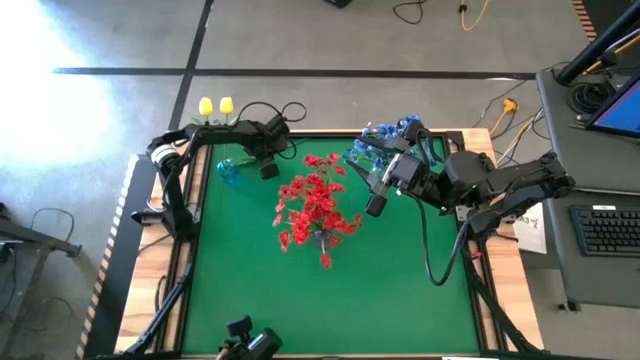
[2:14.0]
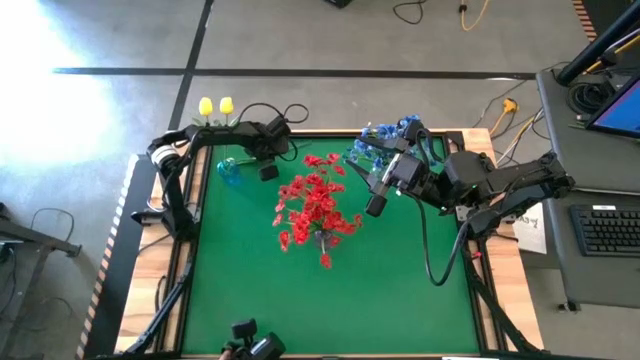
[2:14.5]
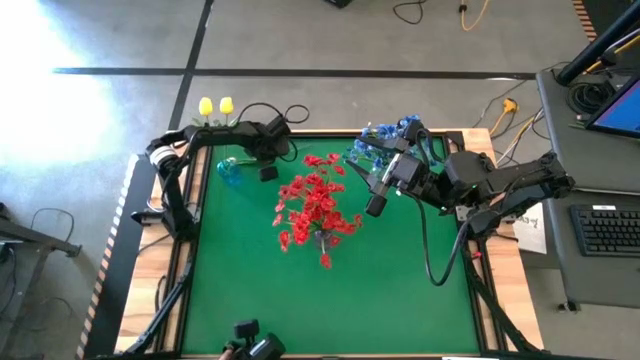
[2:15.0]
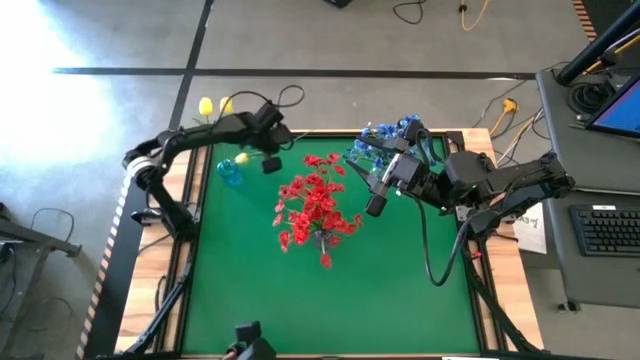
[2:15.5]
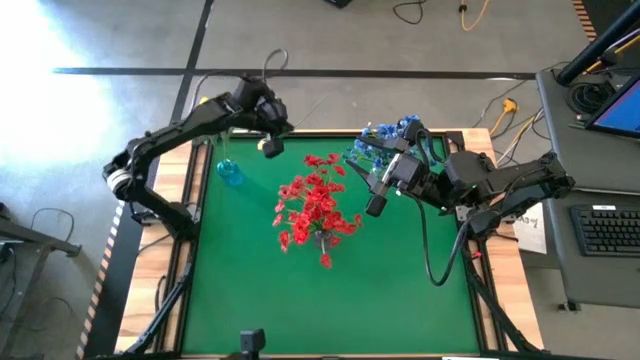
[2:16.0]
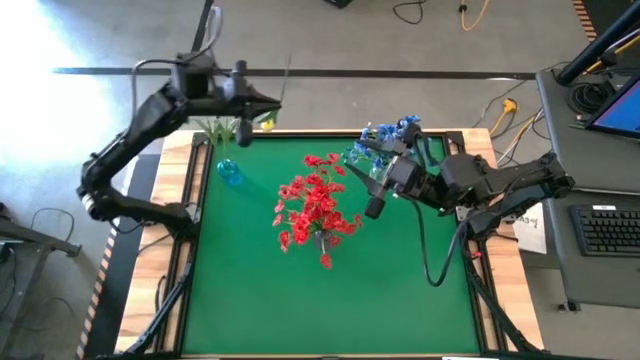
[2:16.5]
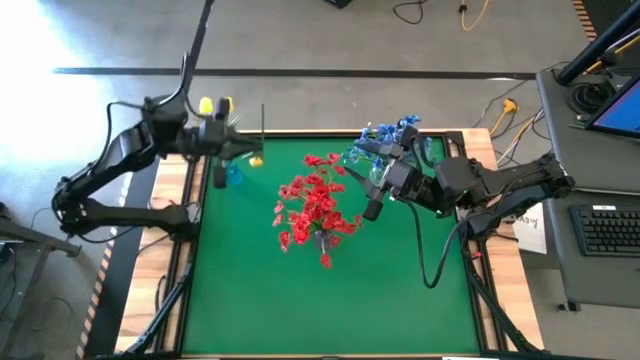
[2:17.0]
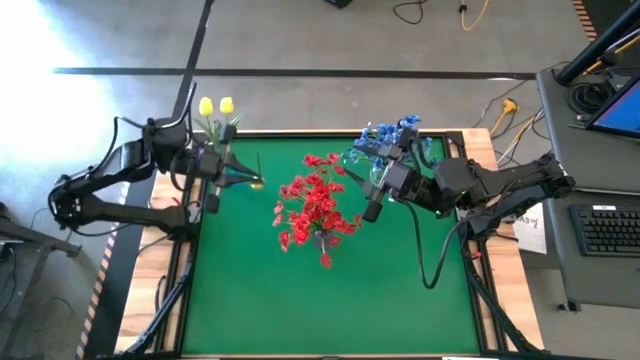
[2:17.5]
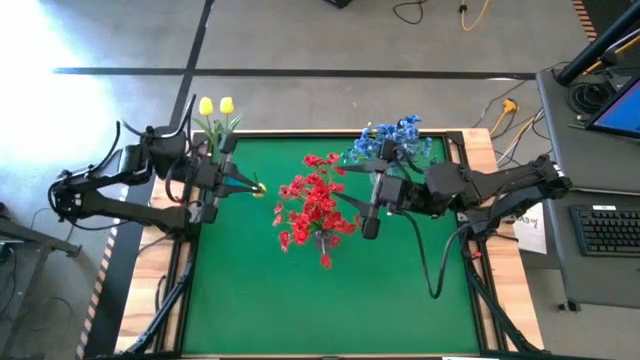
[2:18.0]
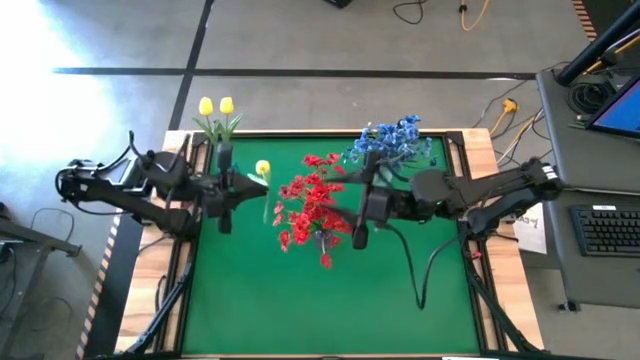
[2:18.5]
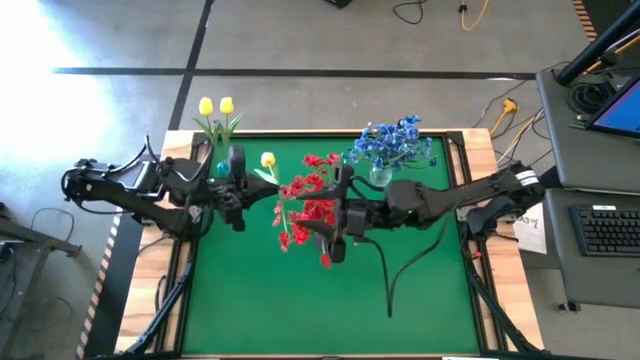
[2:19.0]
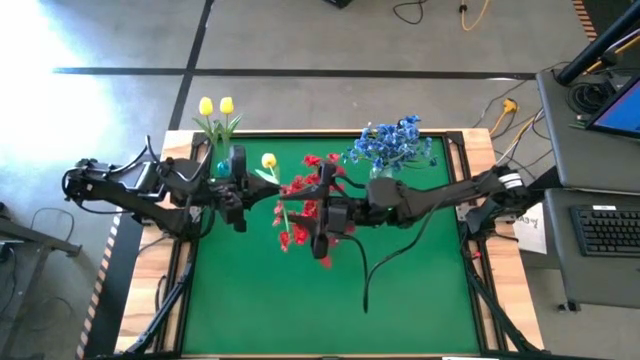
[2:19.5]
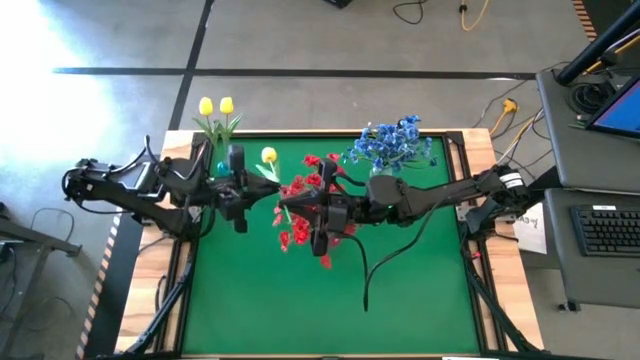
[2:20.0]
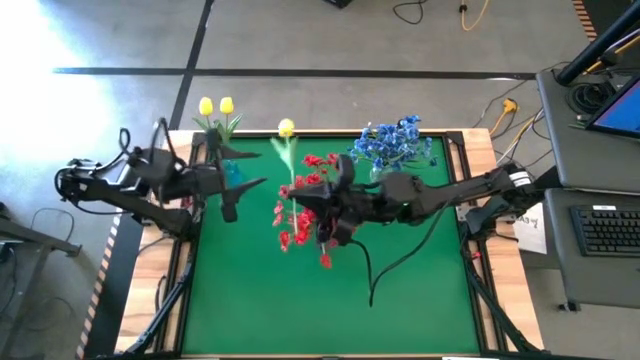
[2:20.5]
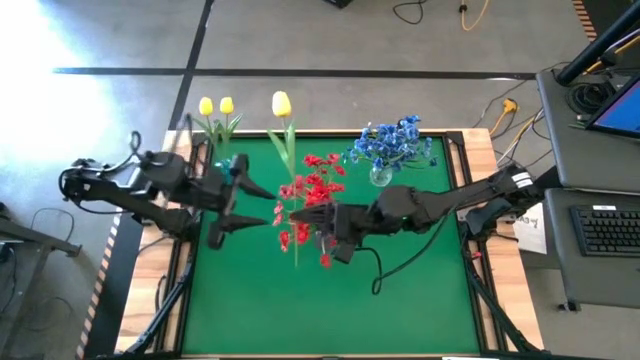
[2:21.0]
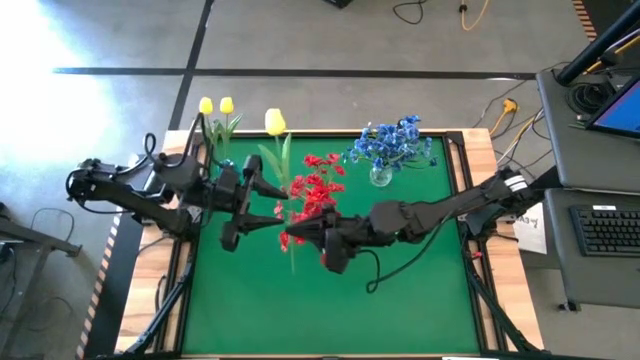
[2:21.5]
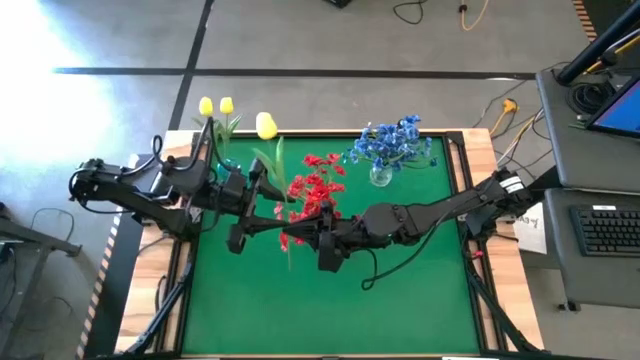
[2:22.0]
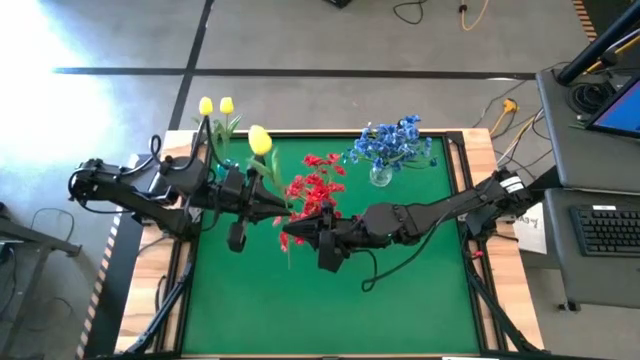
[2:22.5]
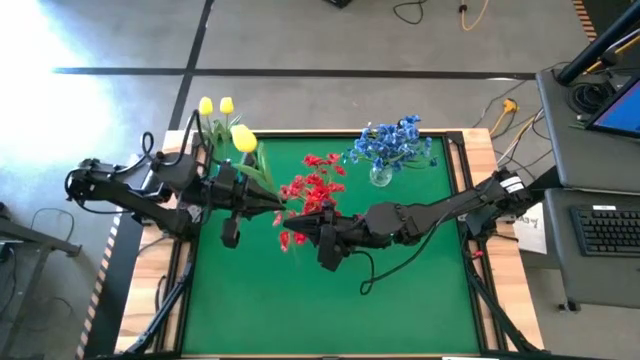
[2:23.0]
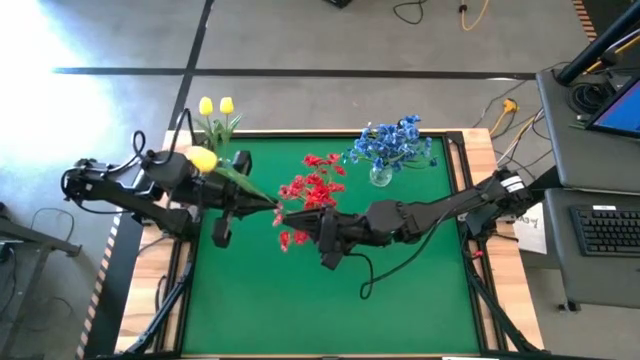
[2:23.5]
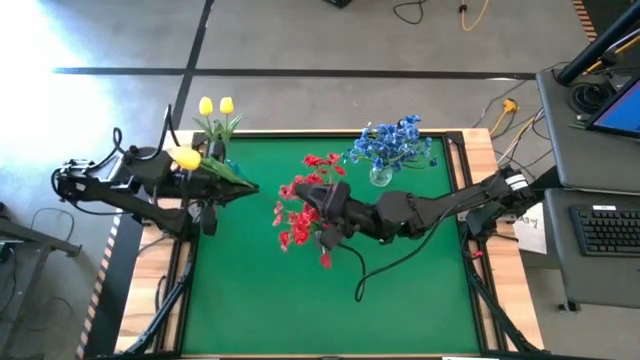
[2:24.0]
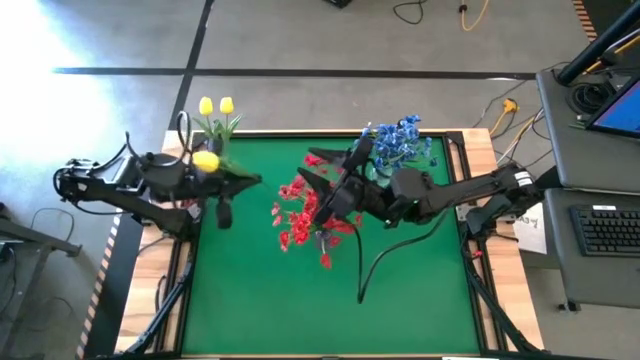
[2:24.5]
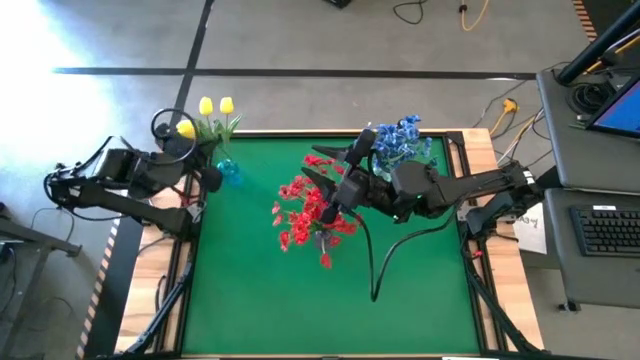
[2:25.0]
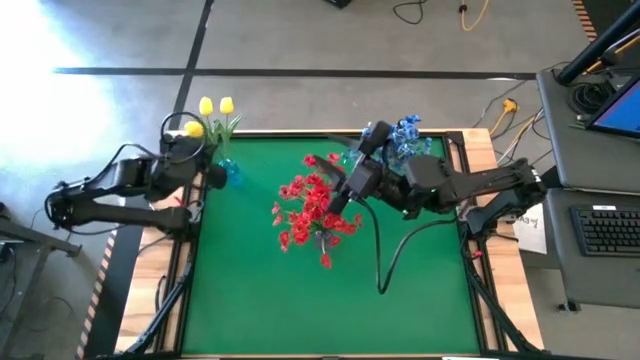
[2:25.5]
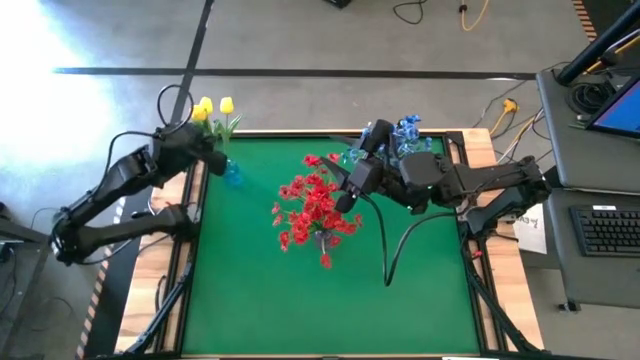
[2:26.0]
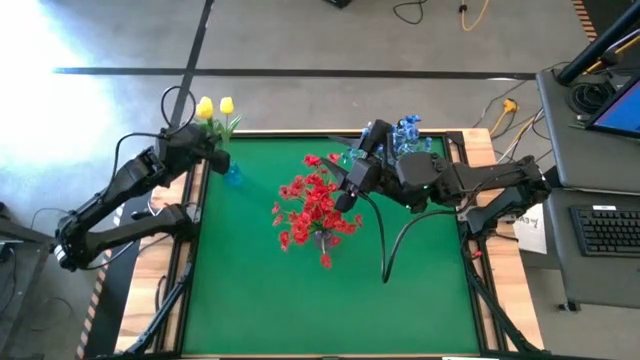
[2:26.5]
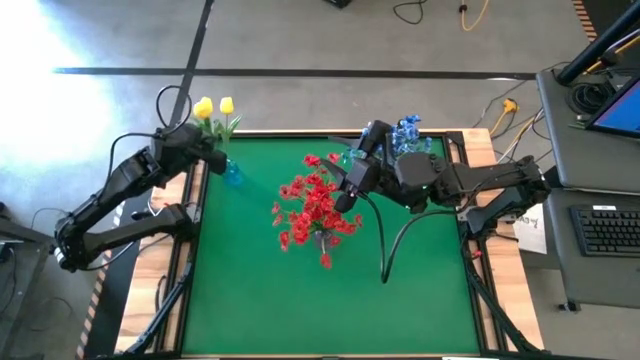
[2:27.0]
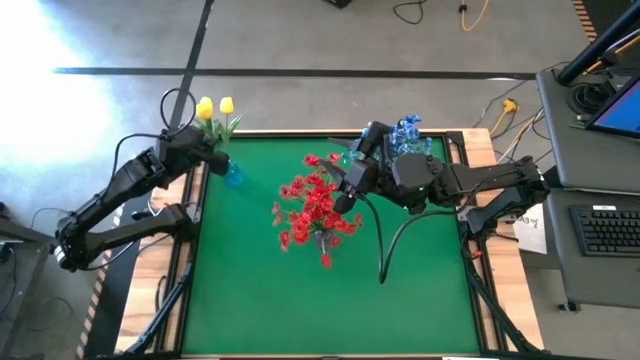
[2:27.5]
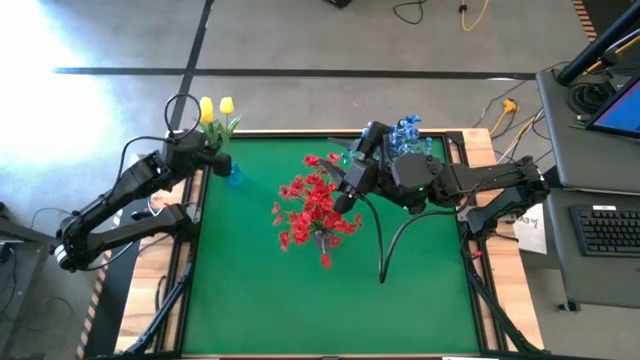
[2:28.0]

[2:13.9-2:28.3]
Task: Sort flowers into vase by color
Put the yellow flower into the blue vase

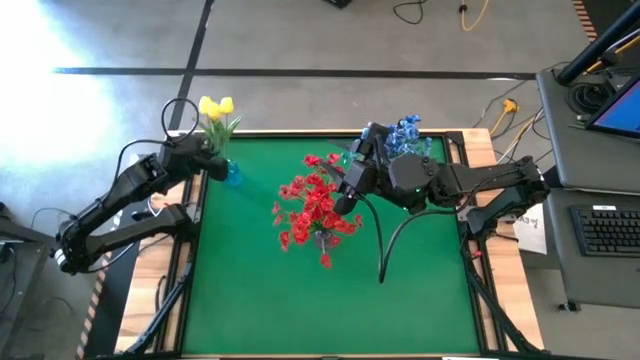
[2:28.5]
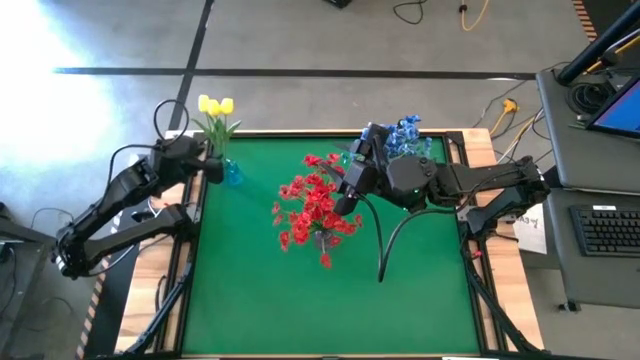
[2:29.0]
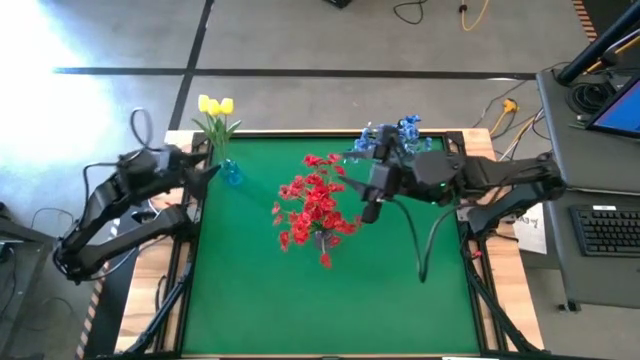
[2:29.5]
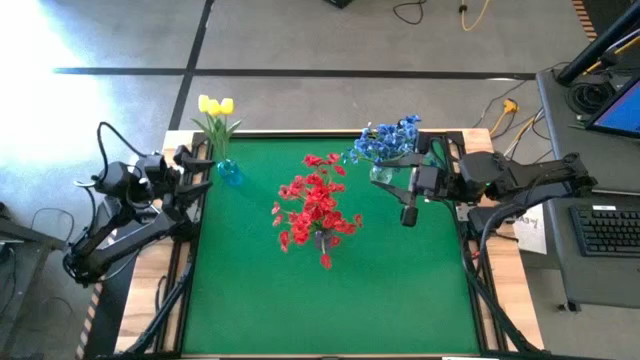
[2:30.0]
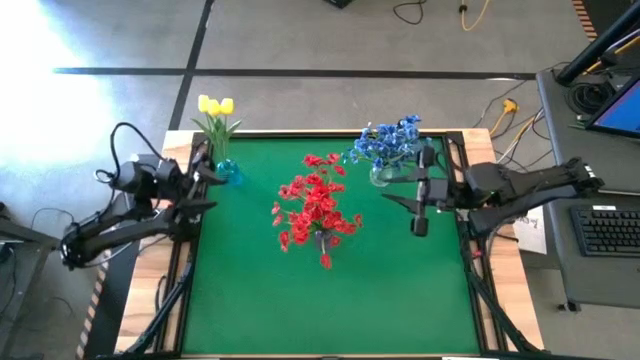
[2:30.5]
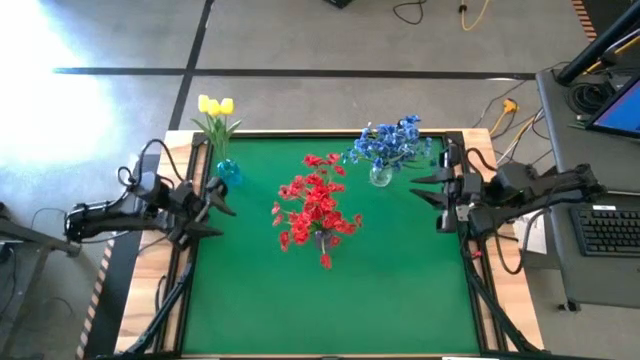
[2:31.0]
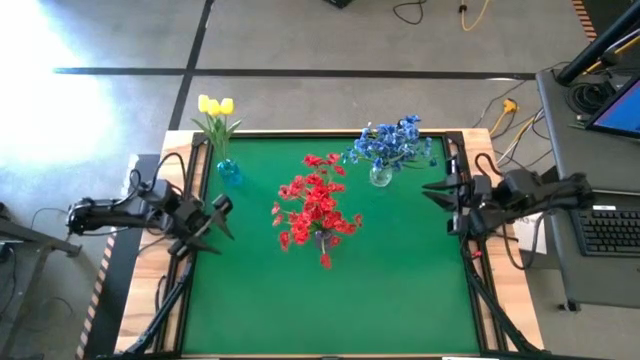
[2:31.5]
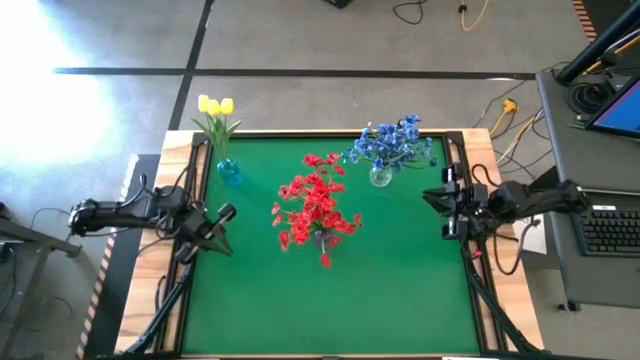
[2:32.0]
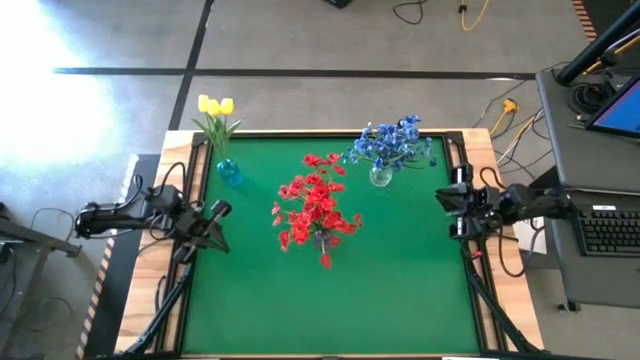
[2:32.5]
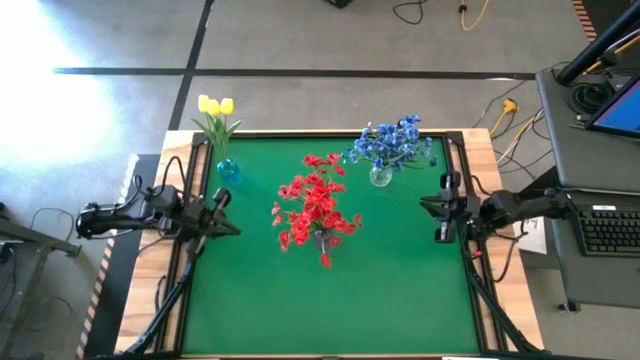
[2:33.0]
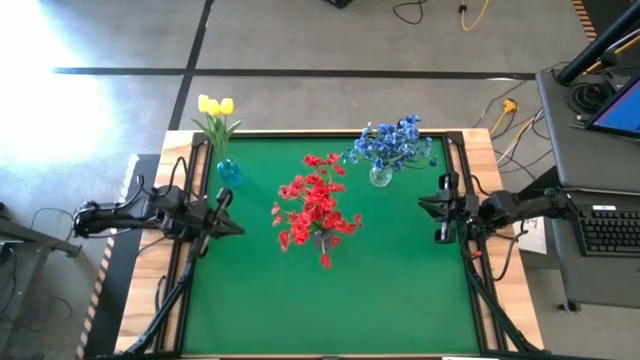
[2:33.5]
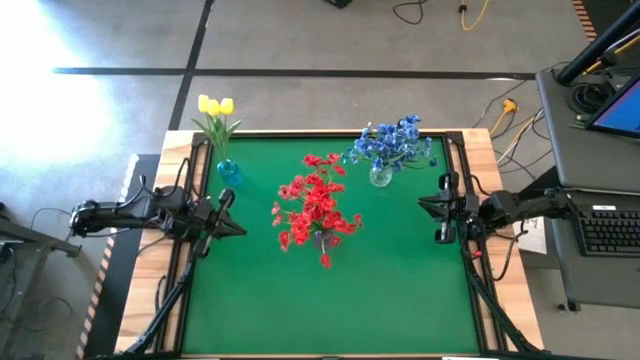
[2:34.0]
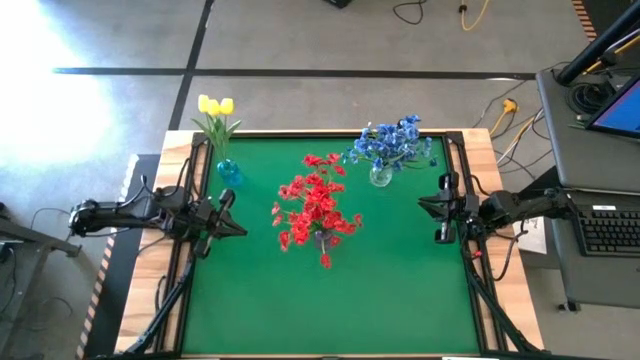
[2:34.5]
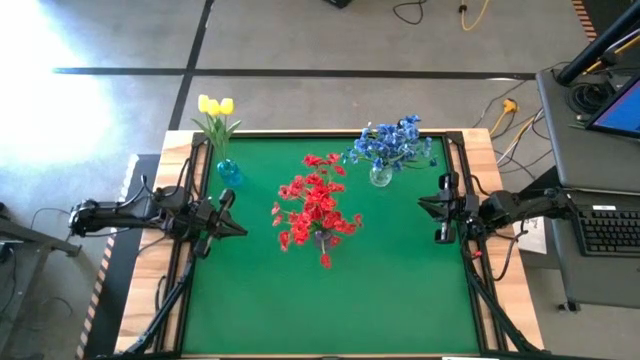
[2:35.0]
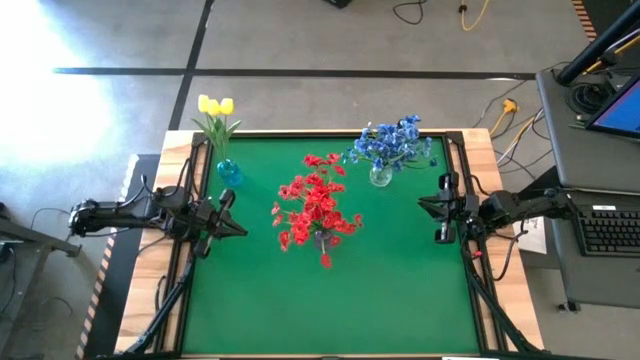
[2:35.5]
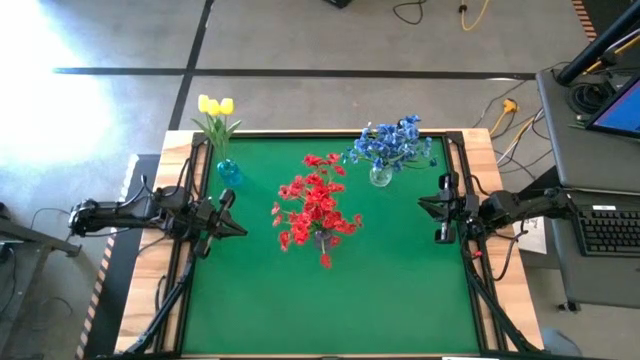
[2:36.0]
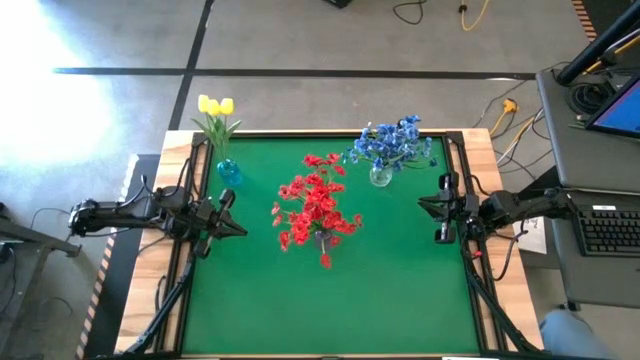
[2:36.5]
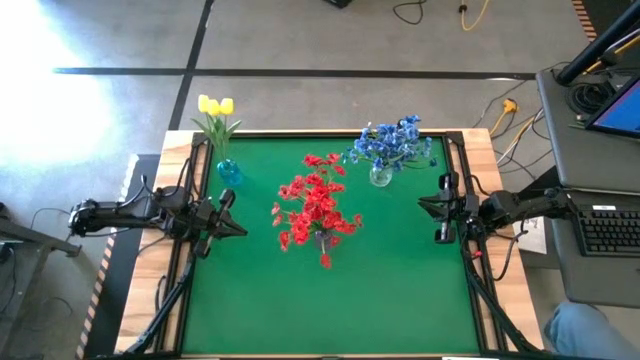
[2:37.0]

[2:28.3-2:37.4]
Return to Home Position
